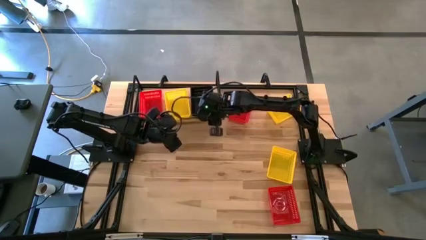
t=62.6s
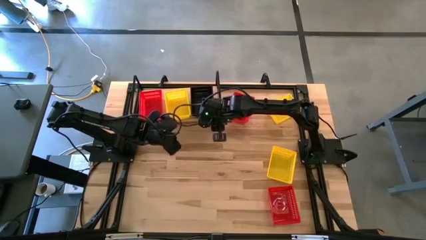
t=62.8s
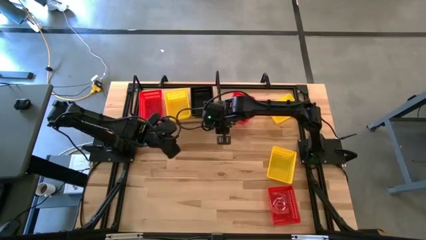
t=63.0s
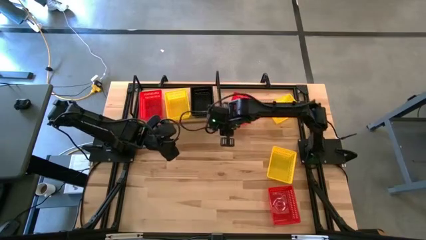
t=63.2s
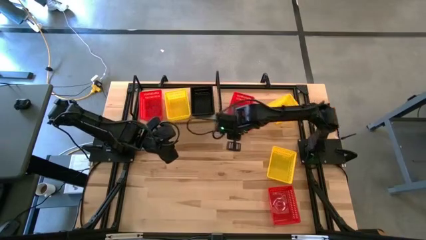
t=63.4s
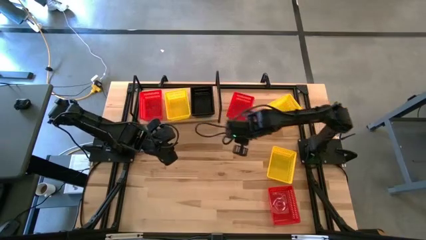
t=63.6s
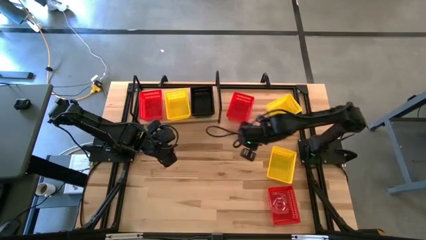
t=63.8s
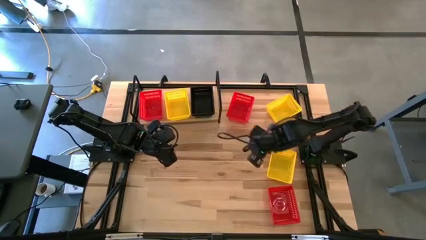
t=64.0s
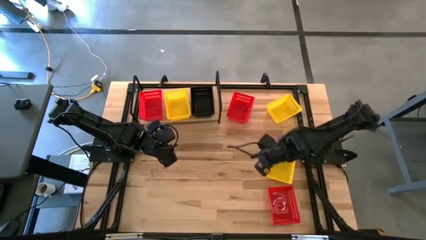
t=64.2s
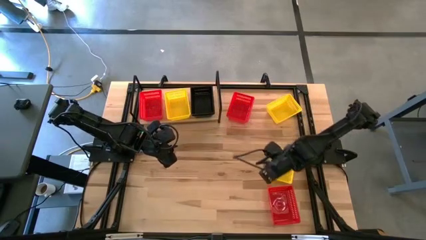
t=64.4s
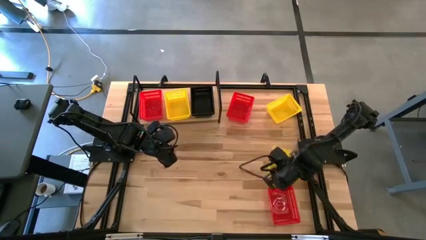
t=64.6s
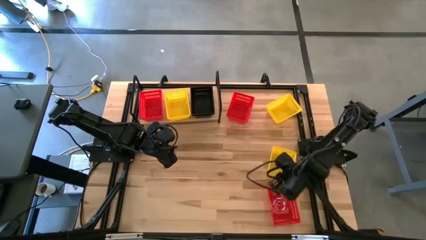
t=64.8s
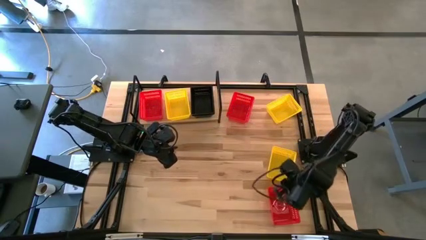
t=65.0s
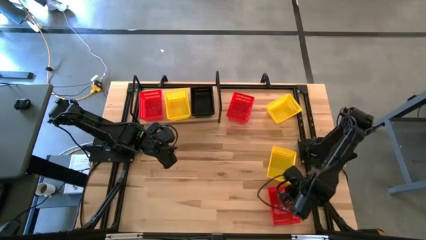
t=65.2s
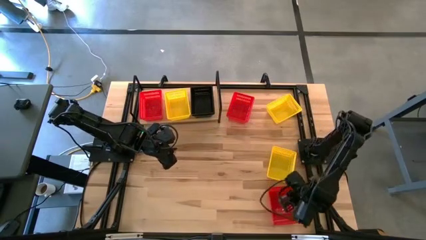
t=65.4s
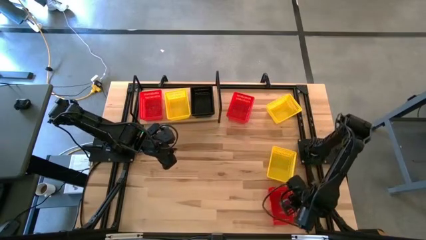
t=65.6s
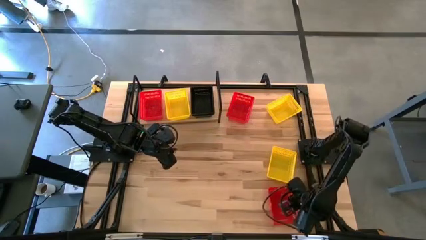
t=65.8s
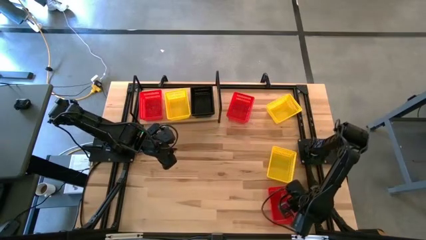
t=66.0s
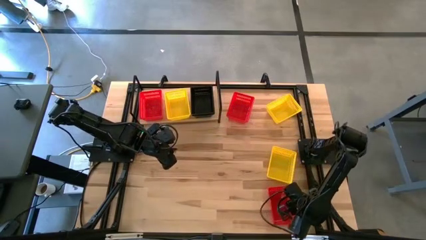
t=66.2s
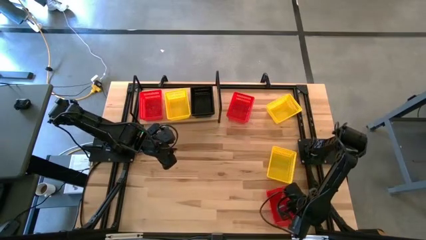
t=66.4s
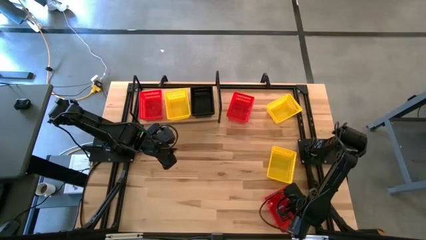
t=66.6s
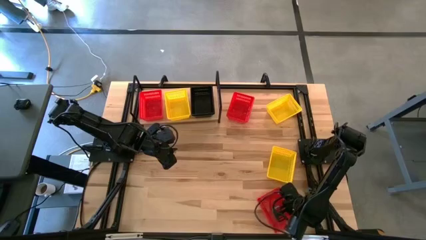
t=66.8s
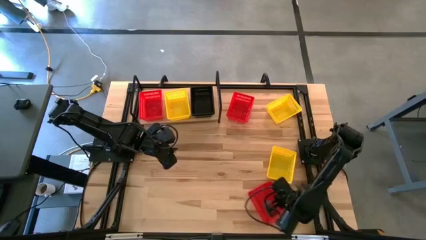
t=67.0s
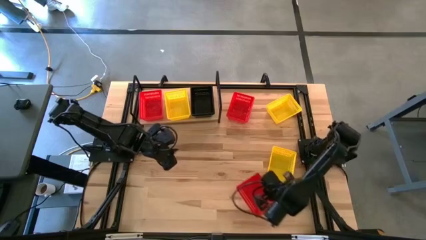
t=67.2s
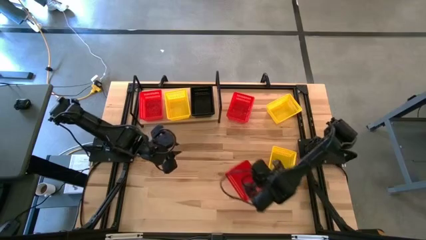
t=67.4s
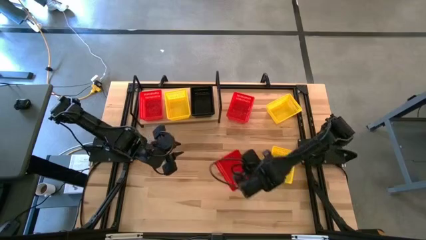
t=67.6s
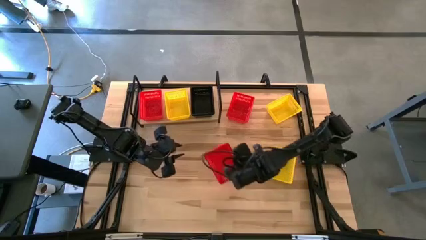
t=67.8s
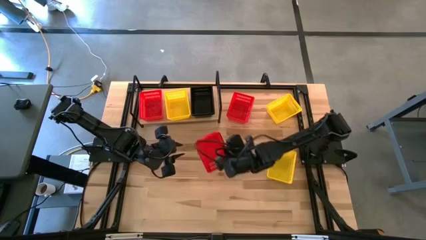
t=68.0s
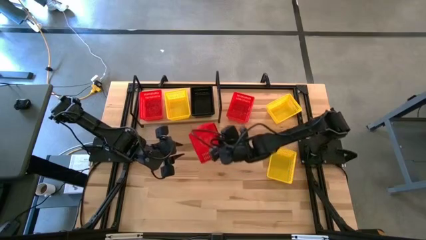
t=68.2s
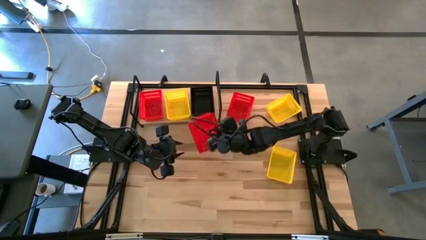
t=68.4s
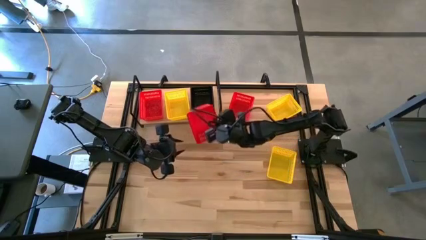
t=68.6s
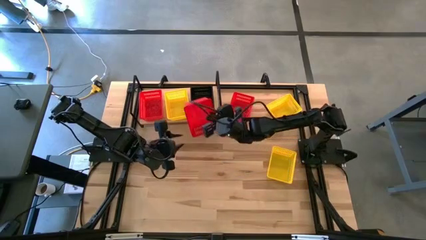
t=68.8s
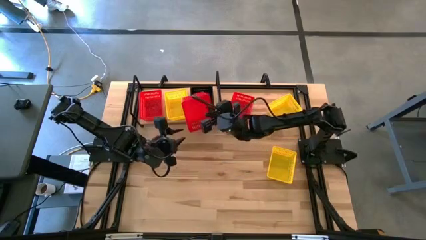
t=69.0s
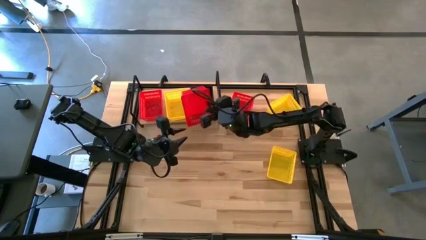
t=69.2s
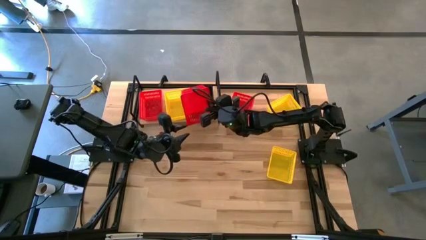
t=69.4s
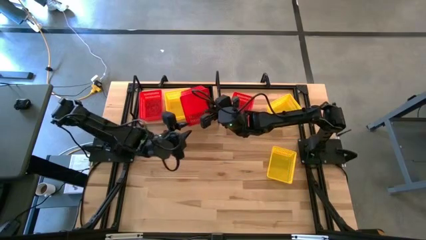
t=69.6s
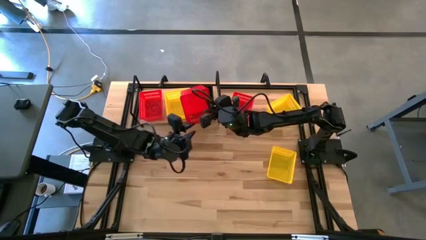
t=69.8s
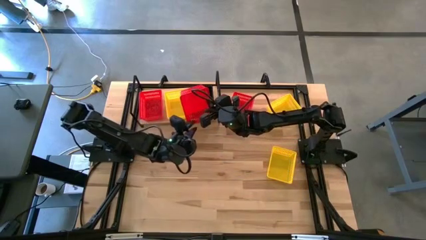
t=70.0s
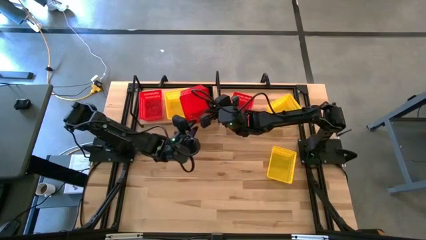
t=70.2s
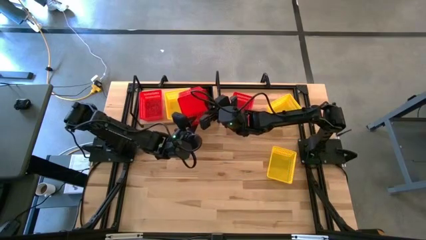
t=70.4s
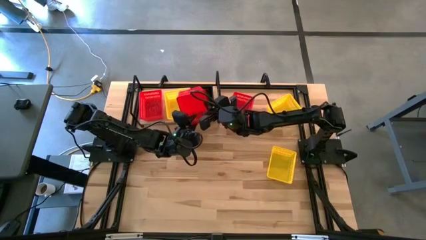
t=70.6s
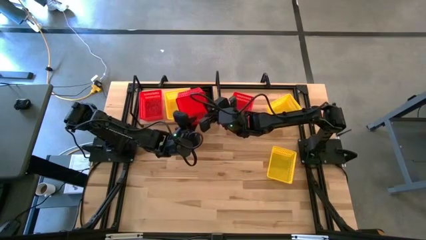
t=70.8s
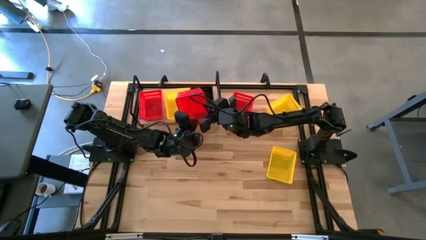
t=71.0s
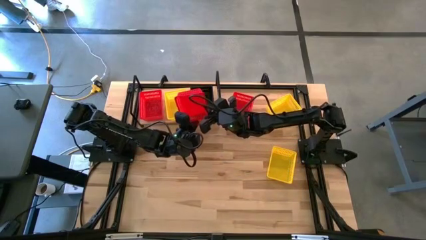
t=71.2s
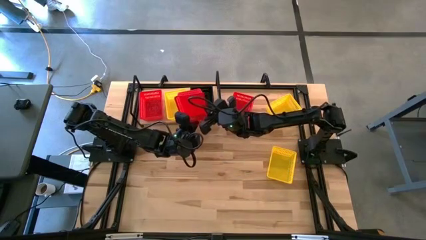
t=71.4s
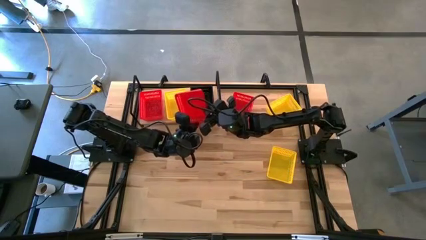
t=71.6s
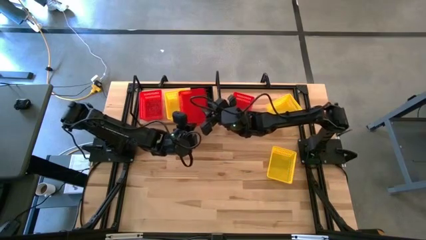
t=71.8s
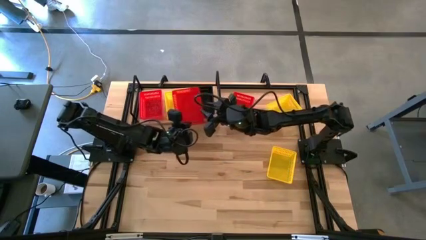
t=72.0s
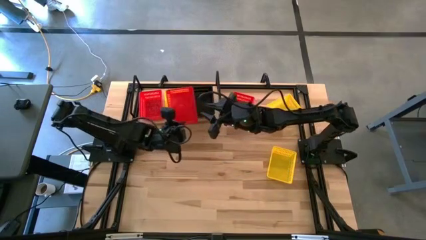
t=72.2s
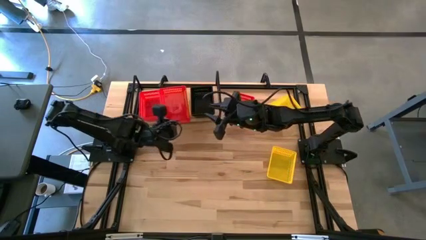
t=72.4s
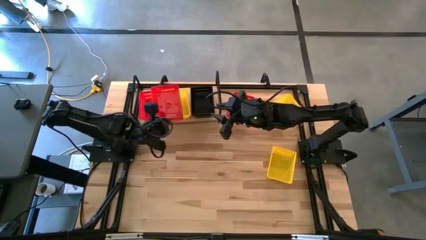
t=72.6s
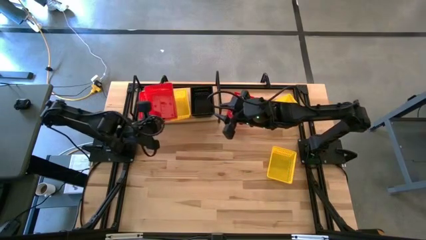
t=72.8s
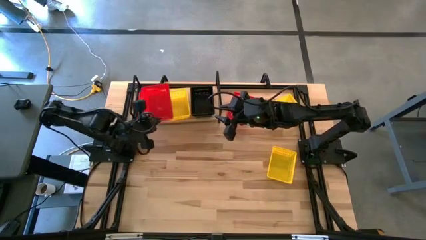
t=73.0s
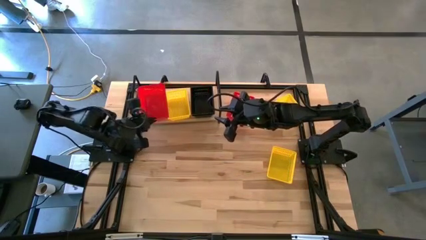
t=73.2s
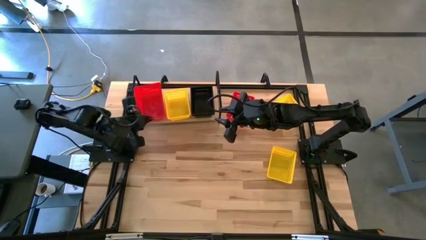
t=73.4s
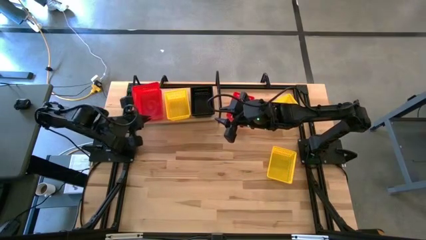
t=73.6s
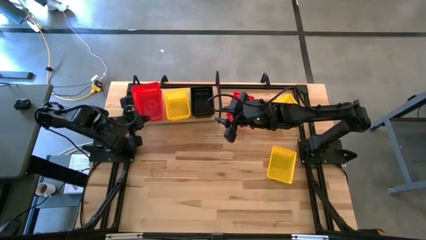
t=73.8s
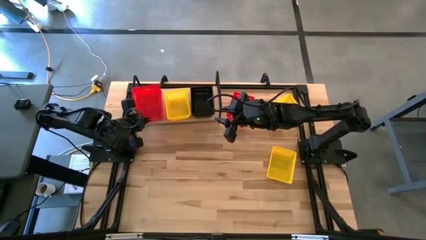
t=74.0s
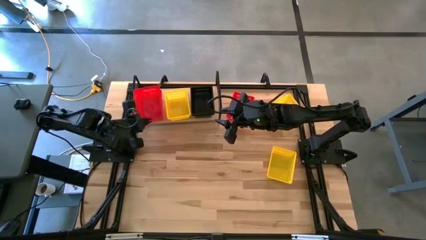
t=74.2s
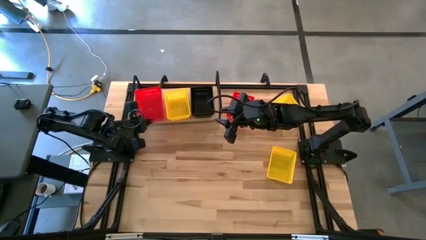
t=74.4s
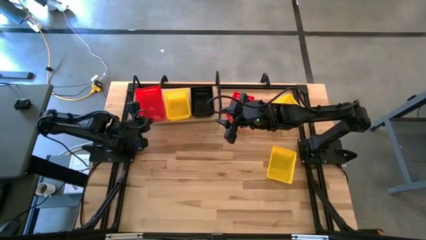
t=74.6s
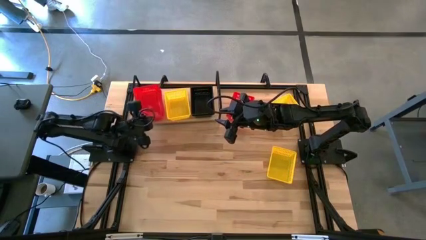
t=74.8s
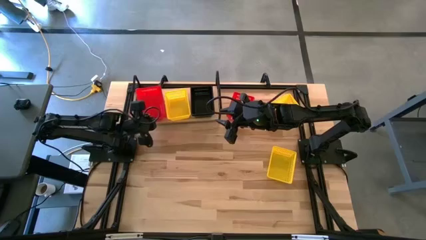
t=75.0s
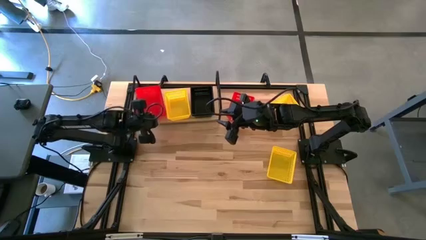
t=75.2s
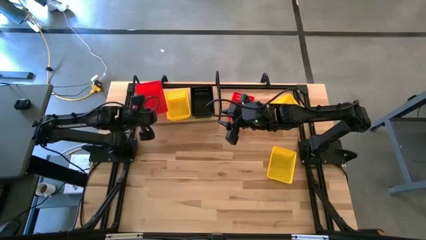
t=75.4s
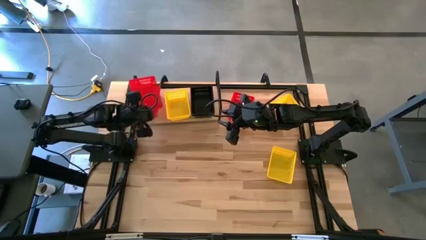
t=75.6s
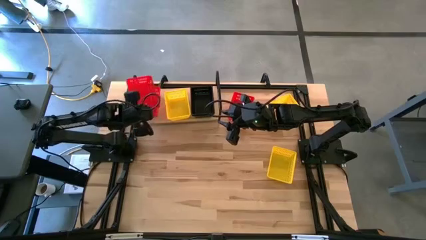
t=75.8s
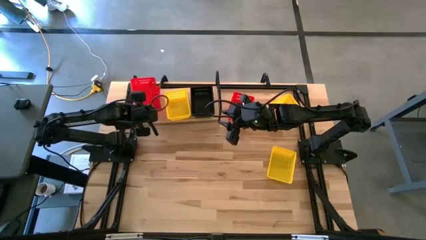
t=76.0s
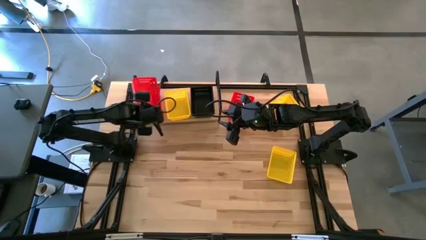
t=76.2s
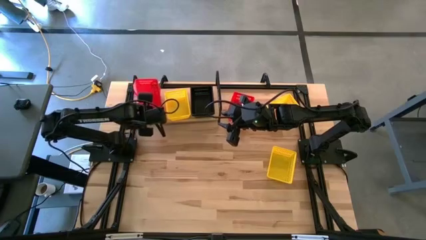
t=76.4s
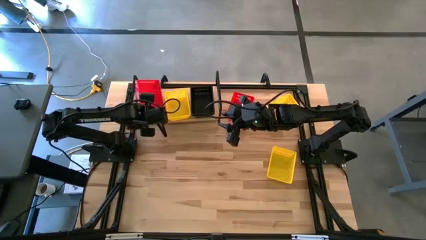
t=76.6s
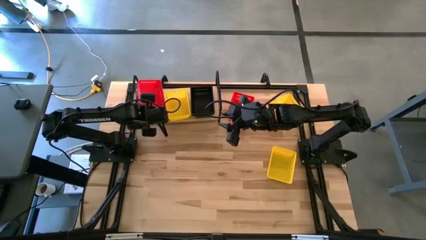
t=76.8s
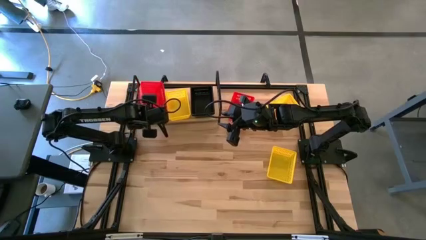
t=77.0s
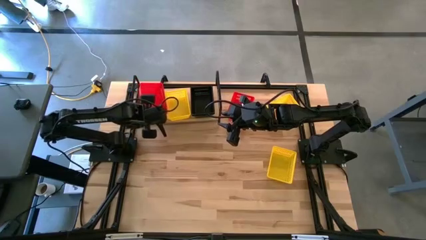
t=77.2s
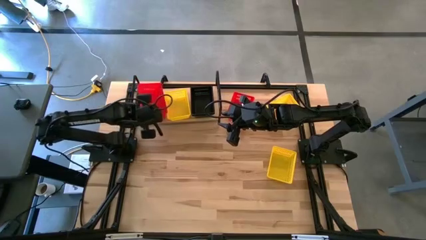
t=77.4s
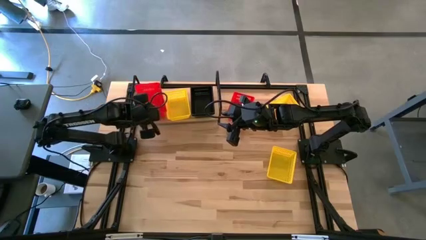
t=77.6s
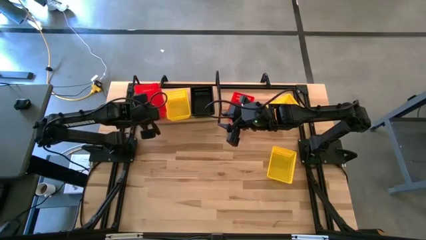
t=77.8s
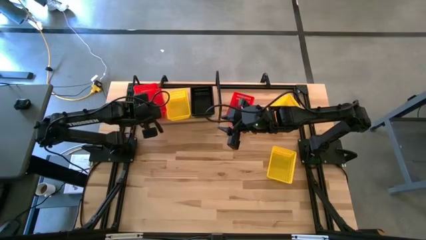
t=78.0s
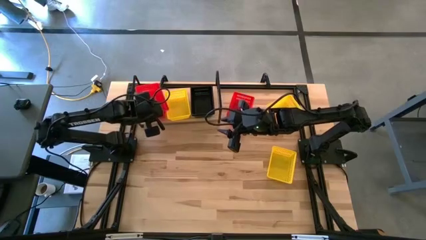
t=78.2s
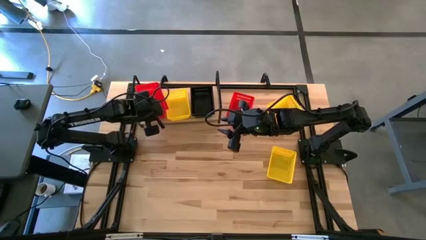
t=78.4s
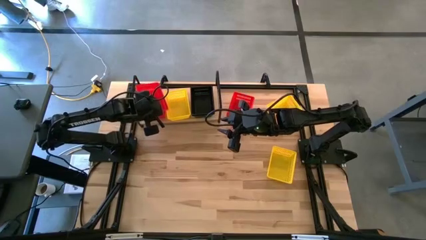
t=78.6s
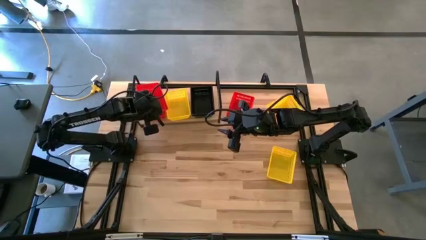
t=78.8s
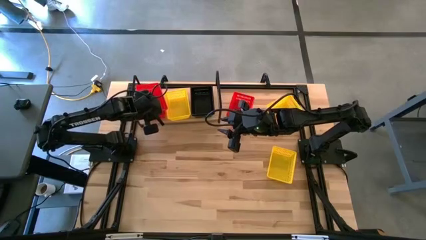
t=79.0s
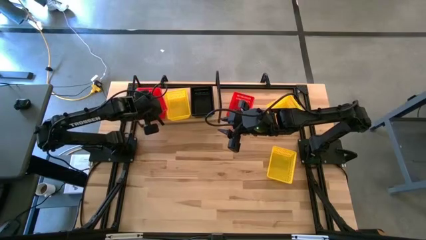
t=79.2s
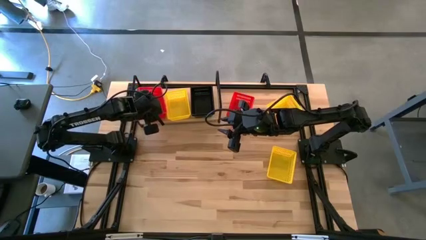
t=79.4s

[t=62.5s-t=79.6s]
Task: Stack baskets on shelf by color
Stack the bottom red bin on top of the red bin on the shelf
